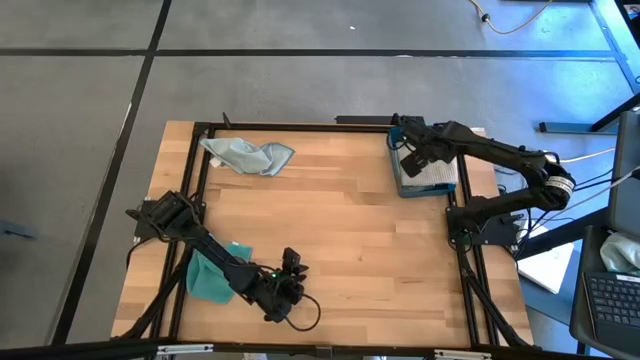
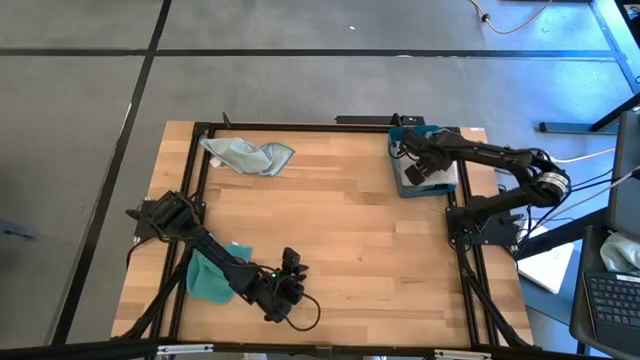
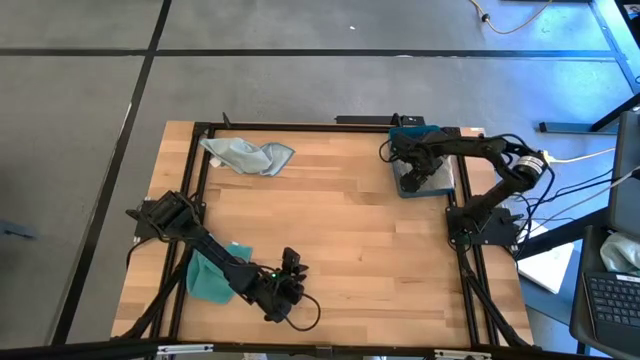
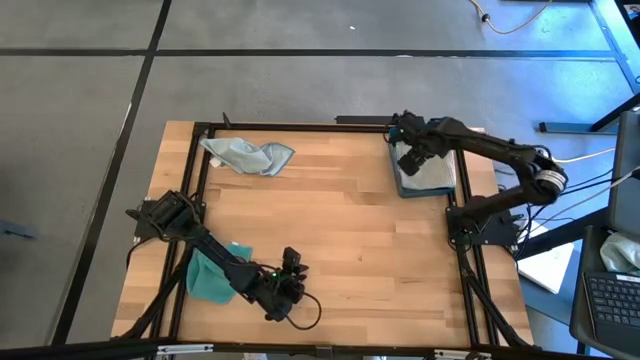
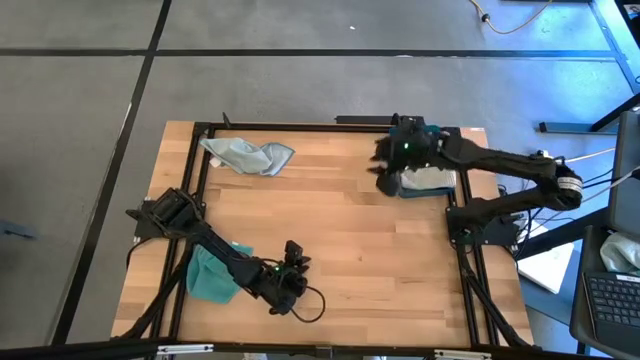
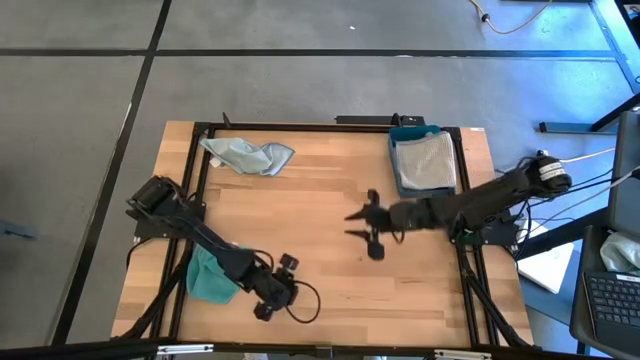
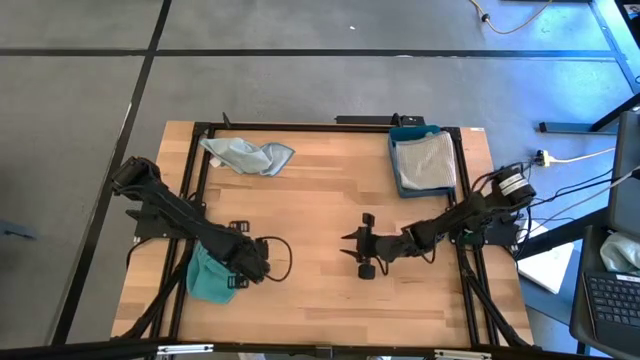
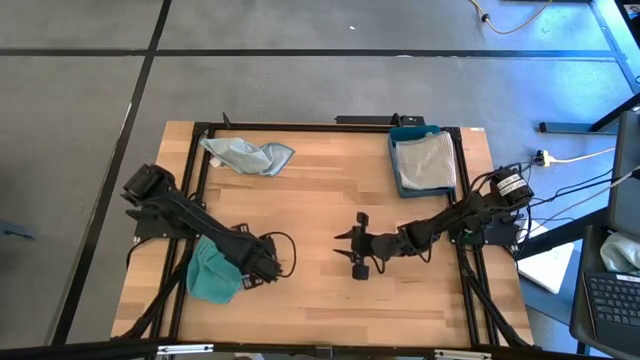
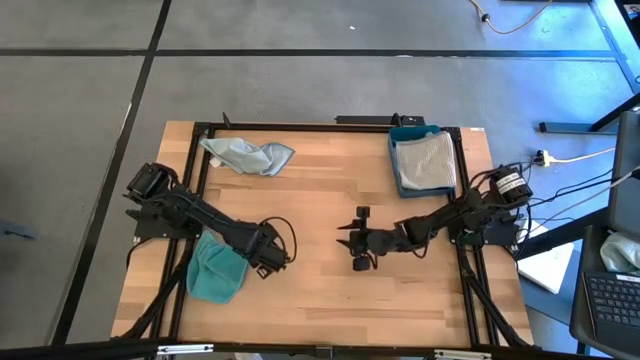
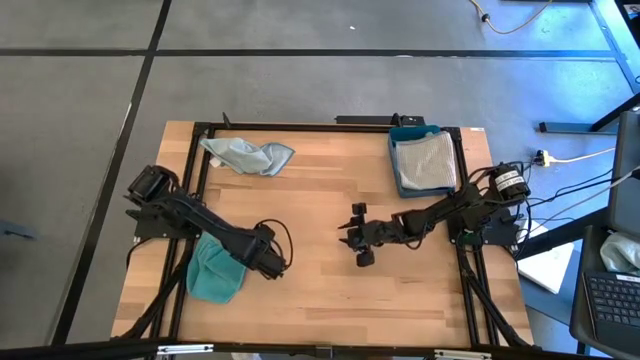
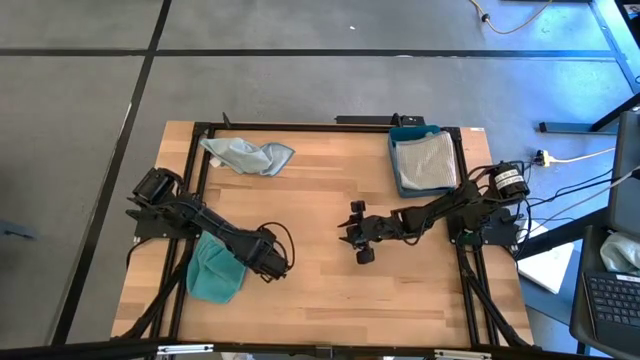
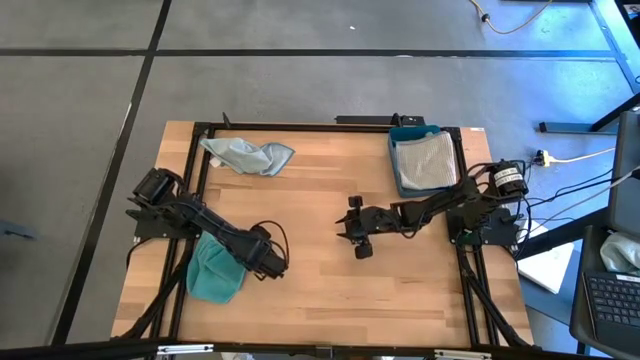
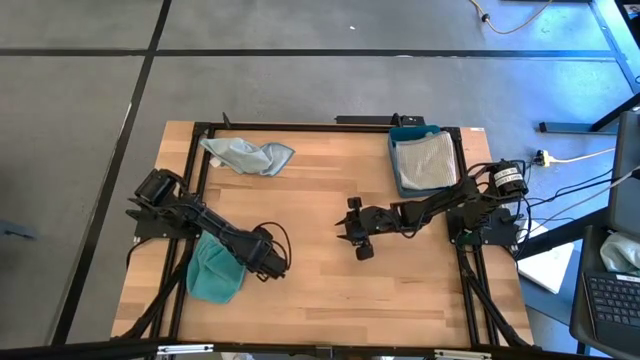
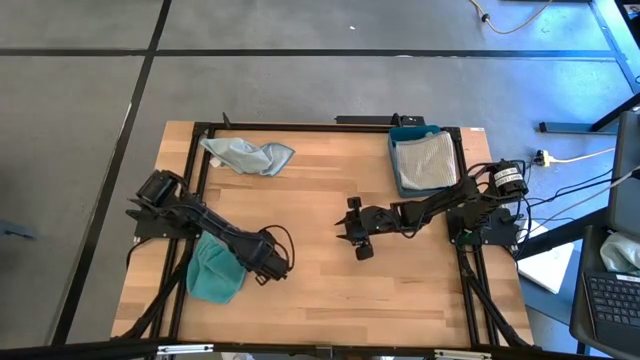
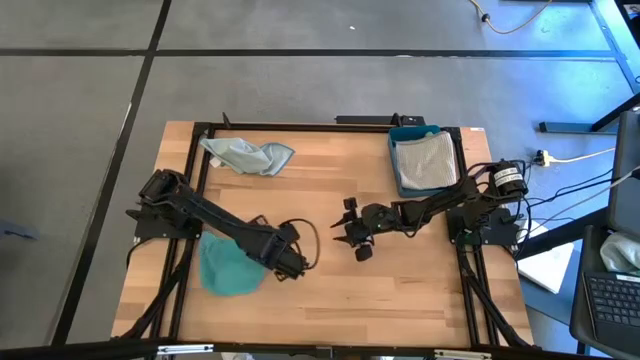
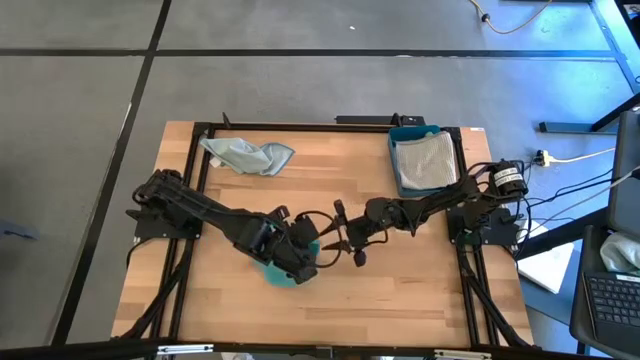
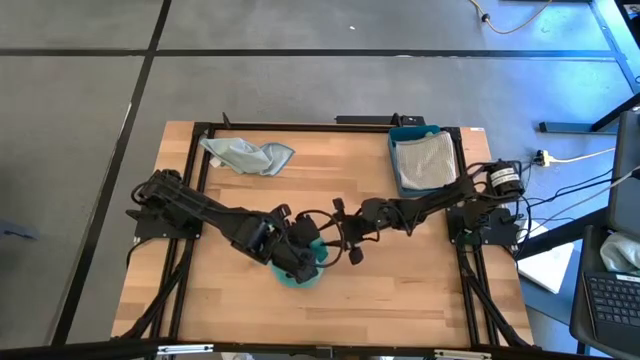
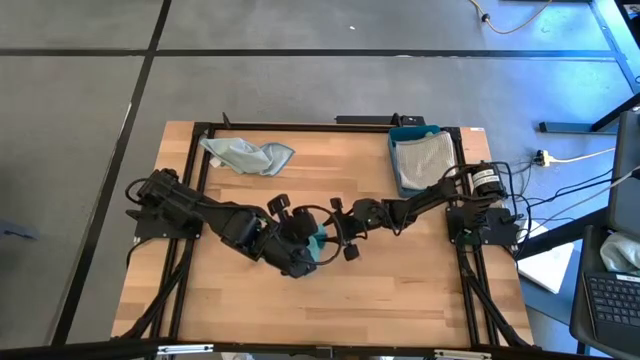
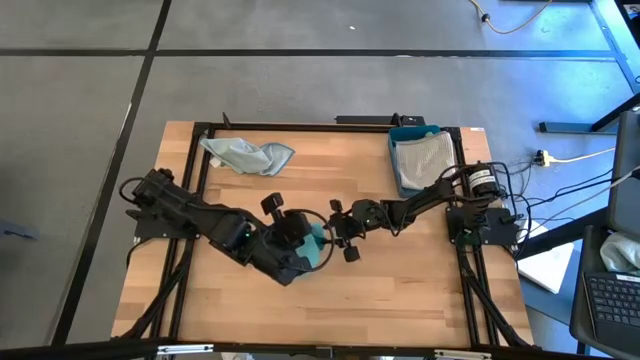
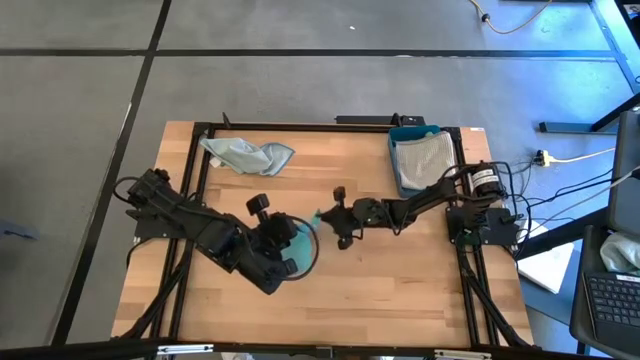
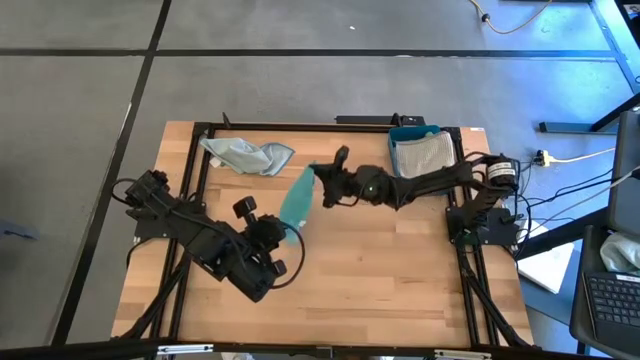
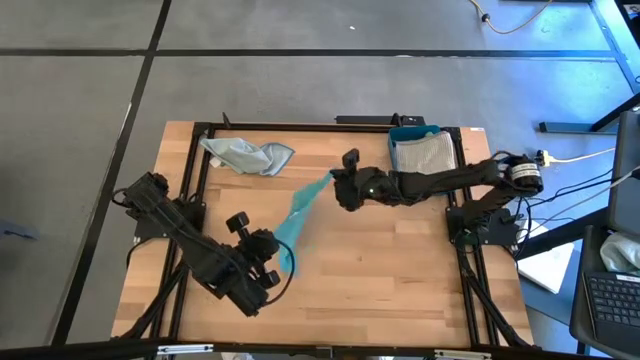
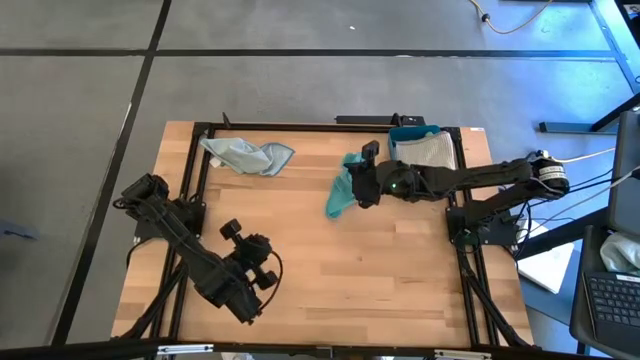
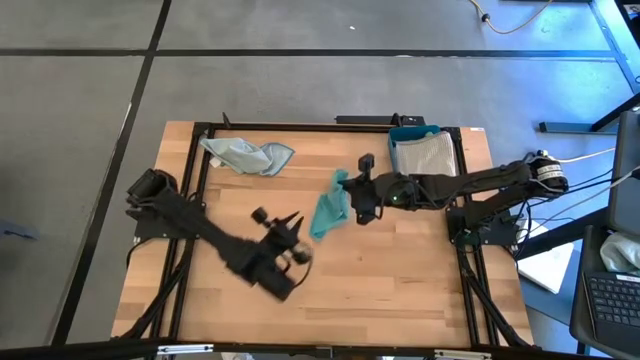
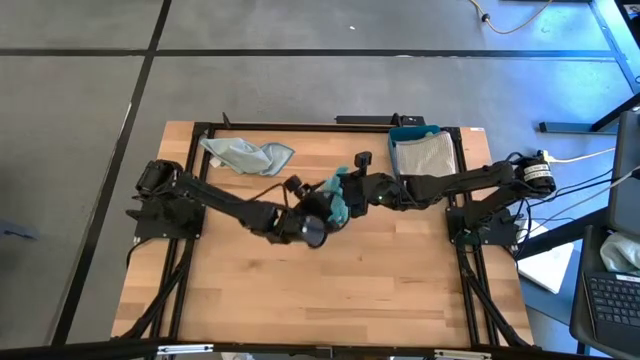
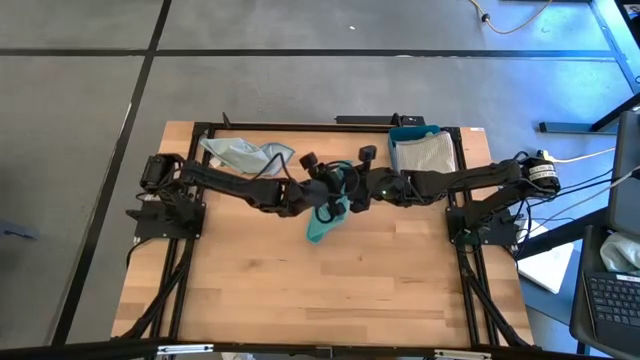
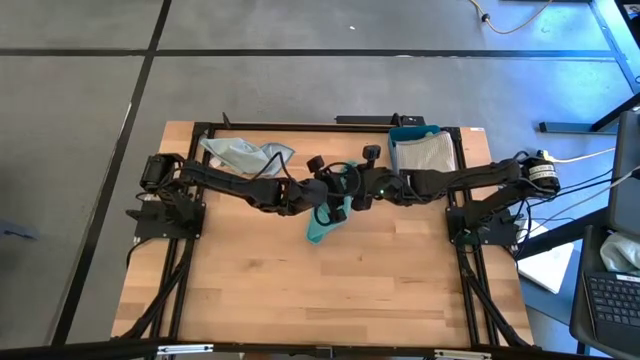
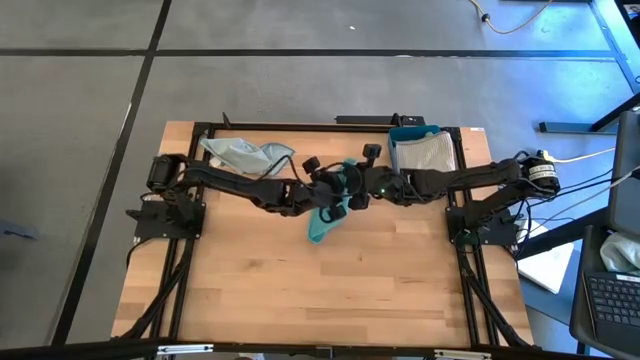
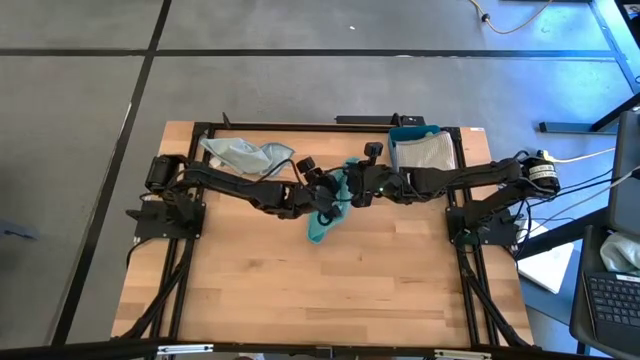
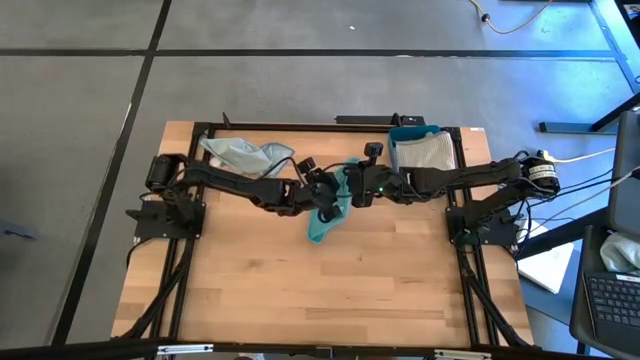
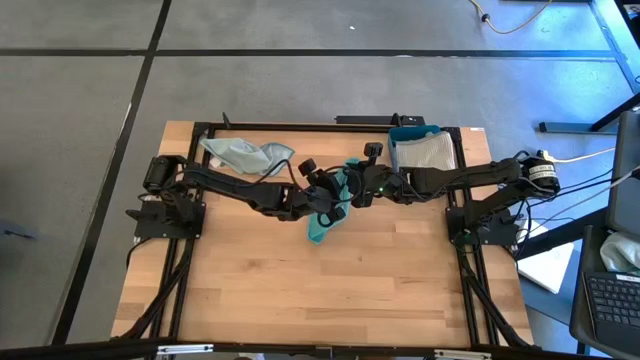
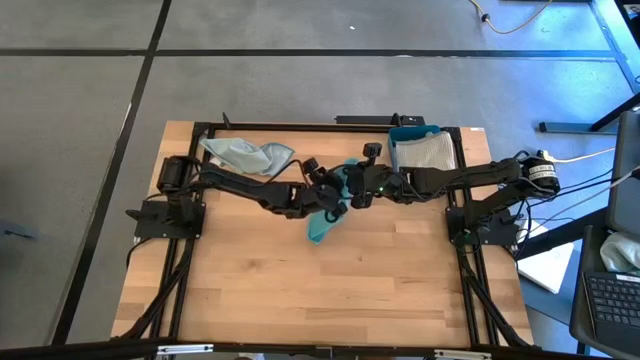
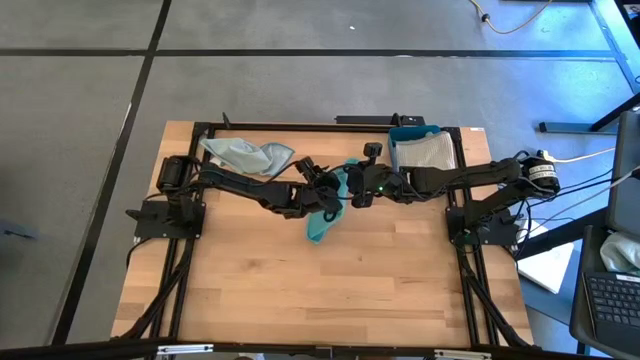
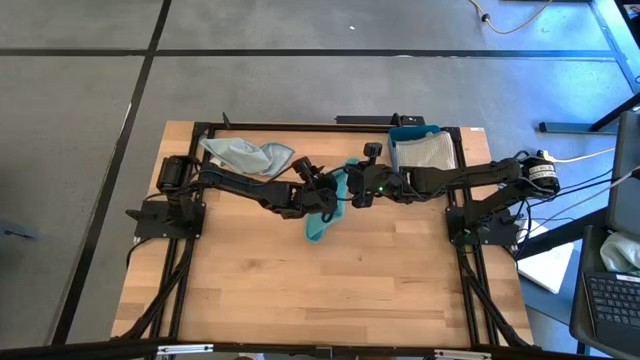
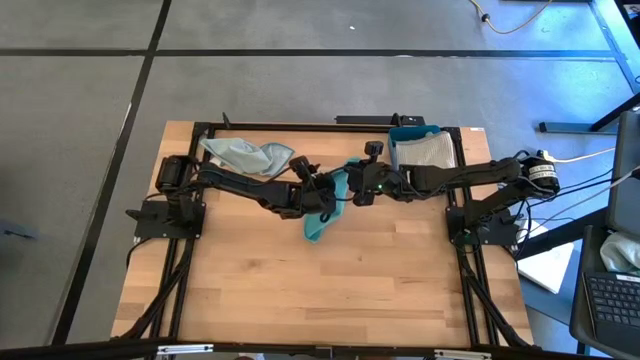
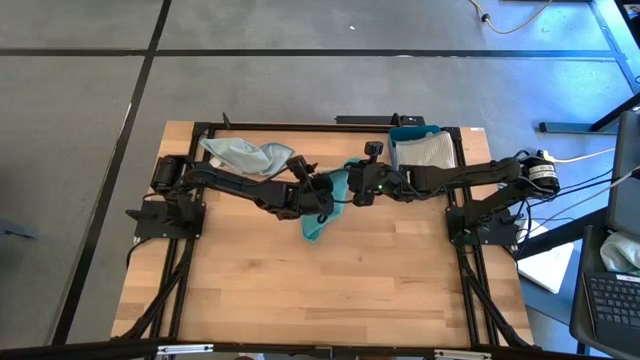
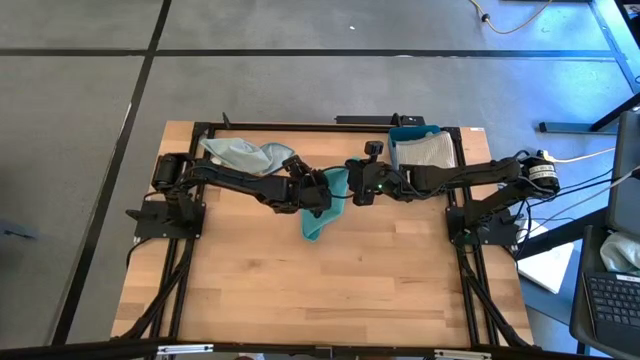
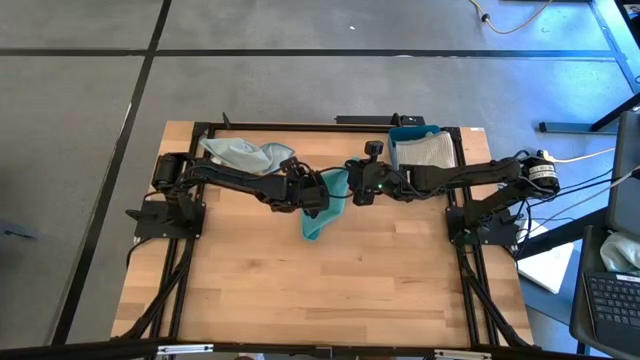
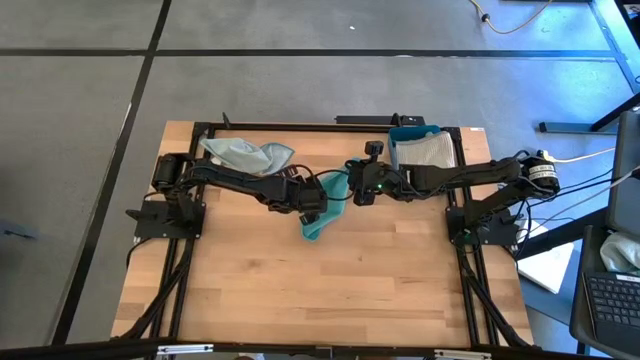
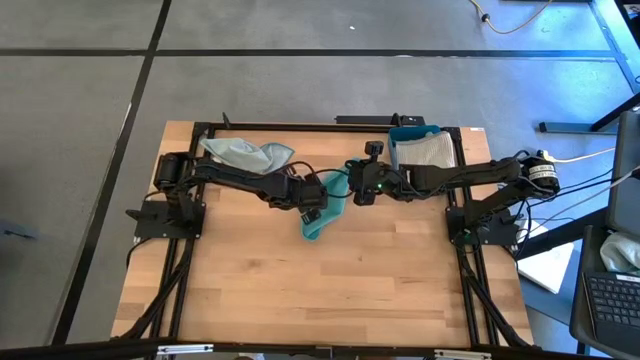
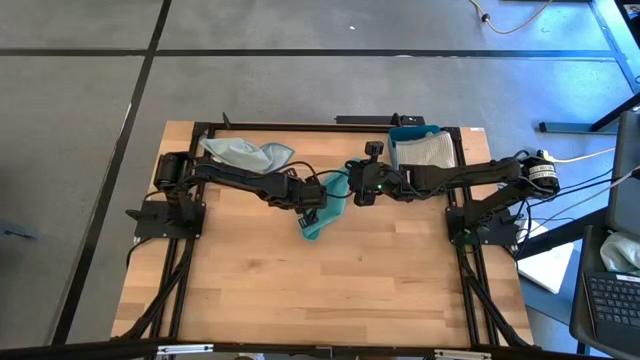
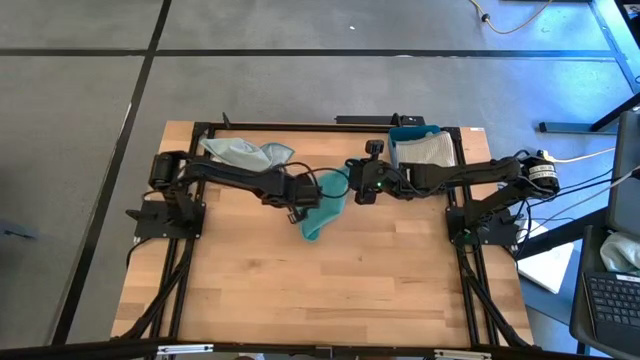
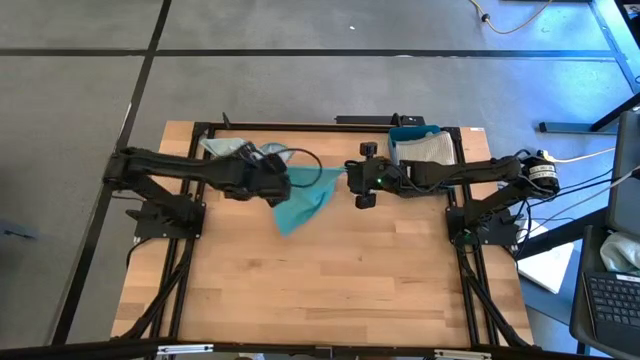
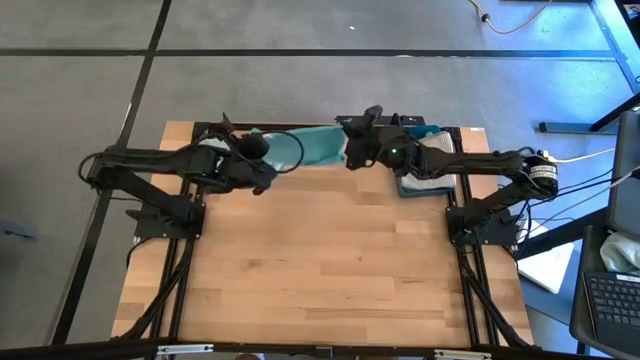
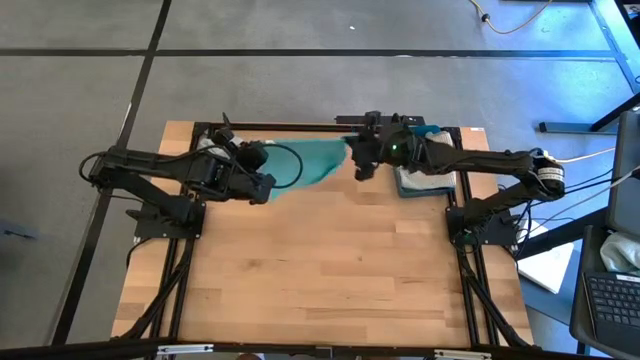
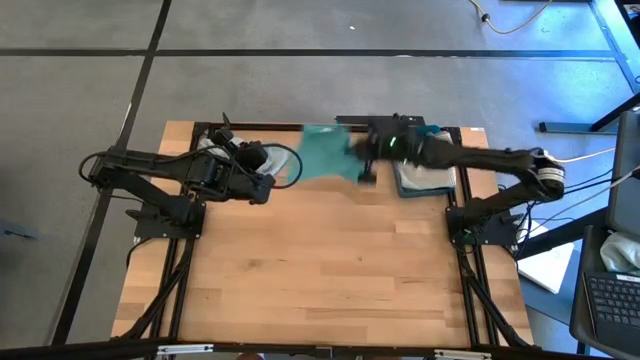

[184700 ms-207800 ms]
Task: Fold microfiber towels
Fold the blue microfiber cloth
